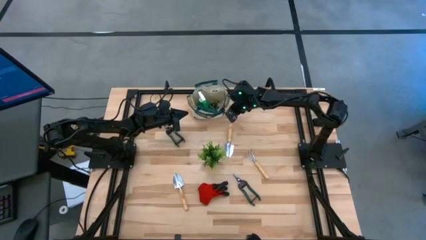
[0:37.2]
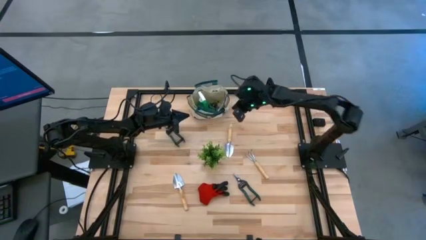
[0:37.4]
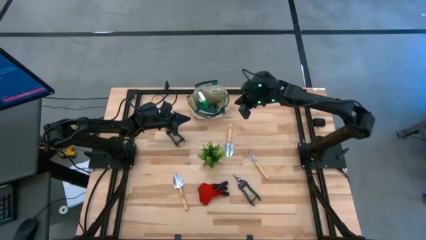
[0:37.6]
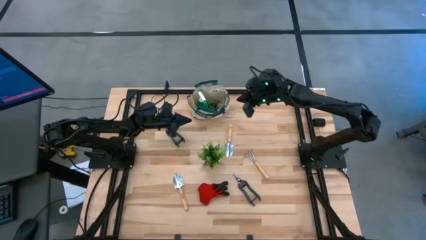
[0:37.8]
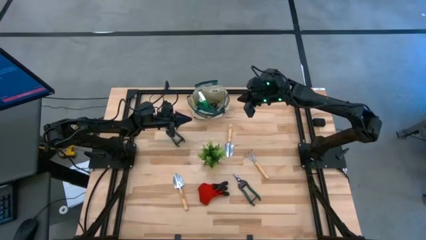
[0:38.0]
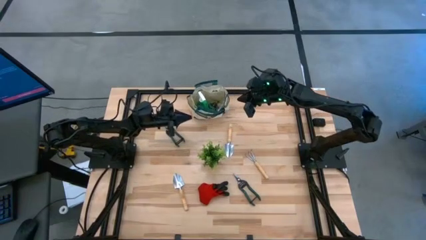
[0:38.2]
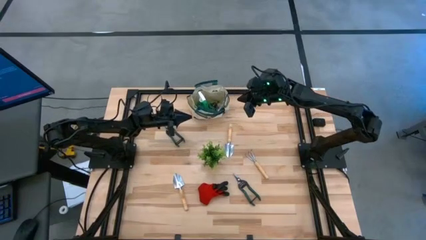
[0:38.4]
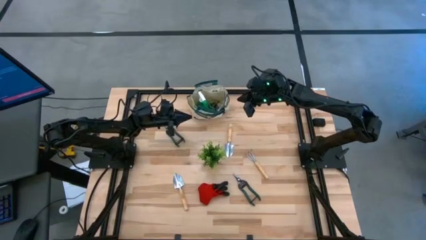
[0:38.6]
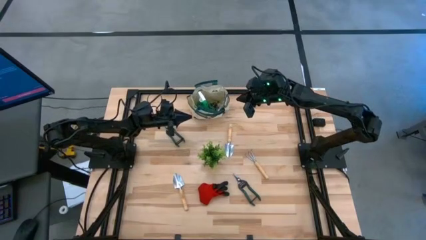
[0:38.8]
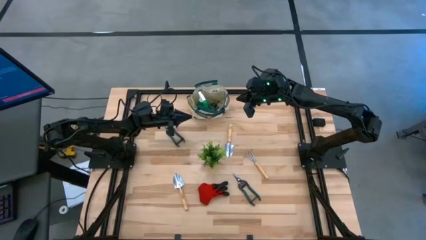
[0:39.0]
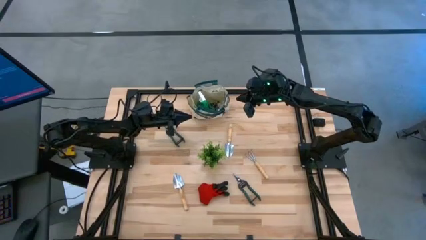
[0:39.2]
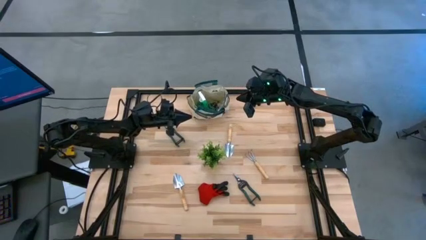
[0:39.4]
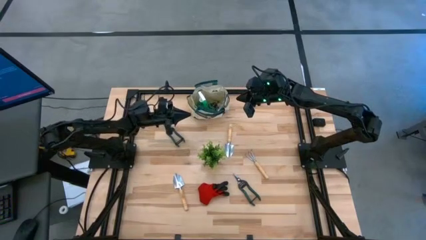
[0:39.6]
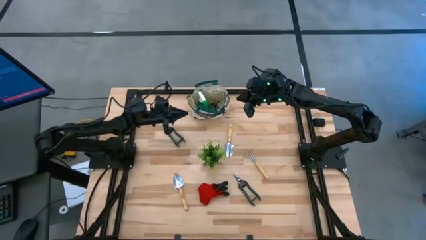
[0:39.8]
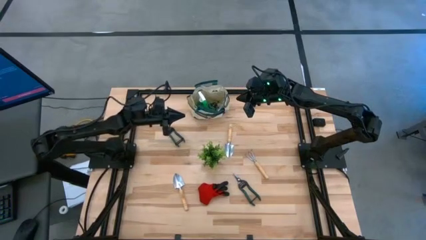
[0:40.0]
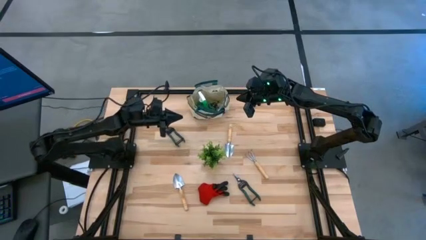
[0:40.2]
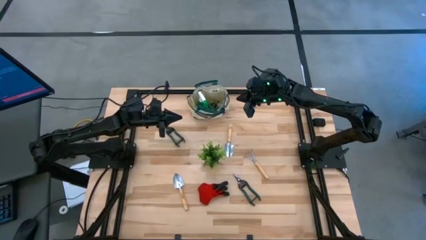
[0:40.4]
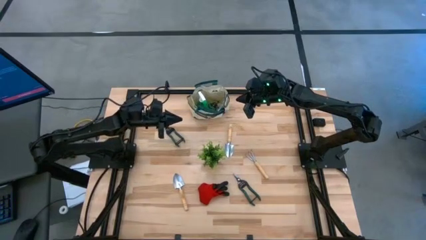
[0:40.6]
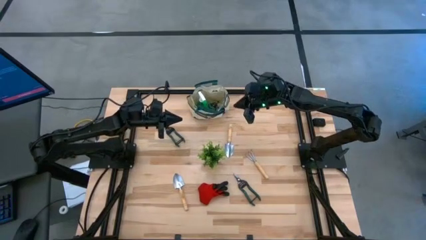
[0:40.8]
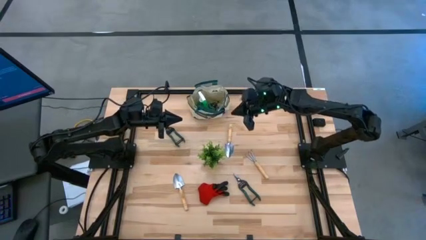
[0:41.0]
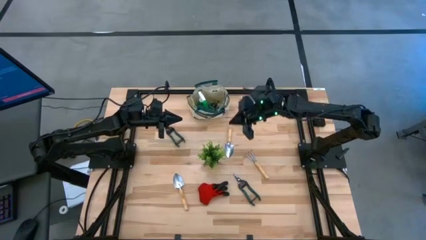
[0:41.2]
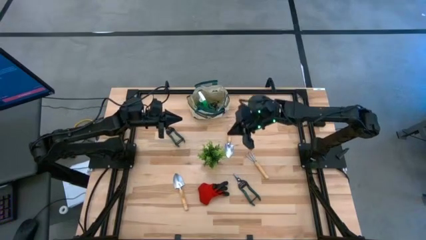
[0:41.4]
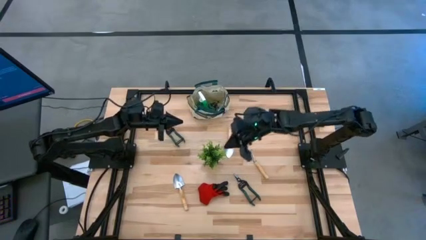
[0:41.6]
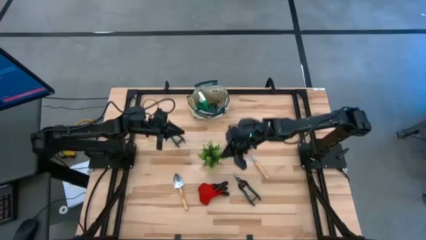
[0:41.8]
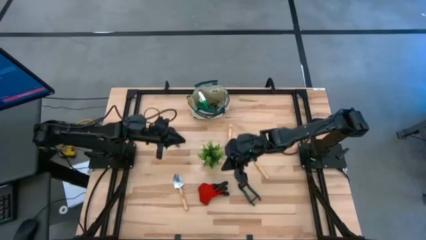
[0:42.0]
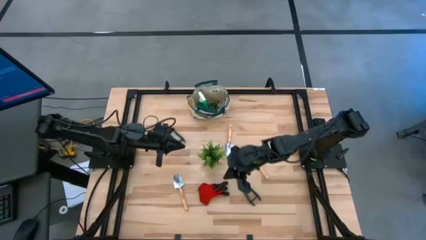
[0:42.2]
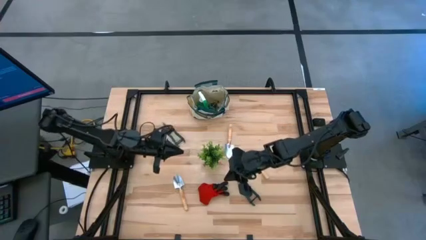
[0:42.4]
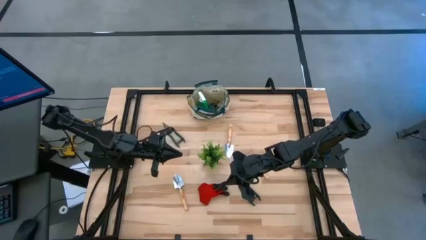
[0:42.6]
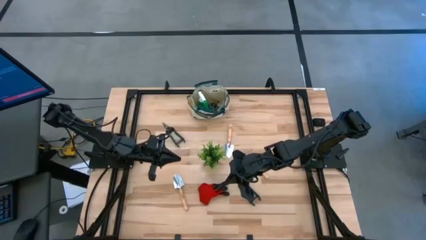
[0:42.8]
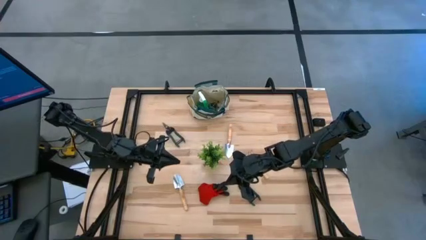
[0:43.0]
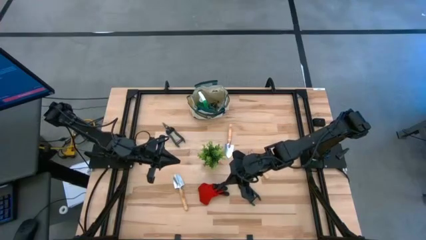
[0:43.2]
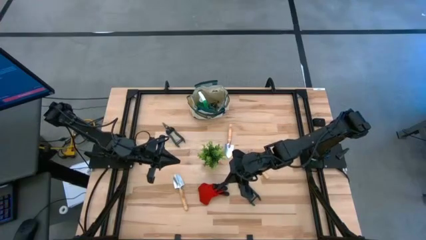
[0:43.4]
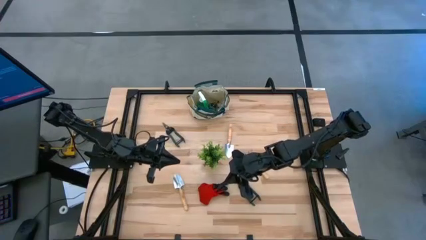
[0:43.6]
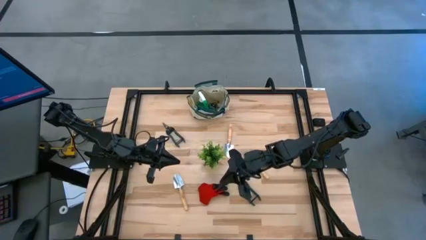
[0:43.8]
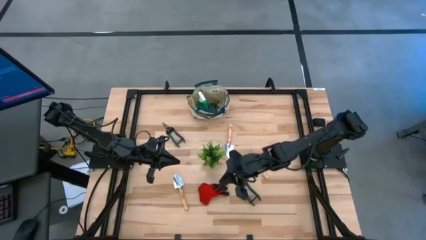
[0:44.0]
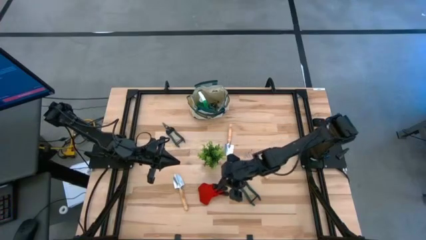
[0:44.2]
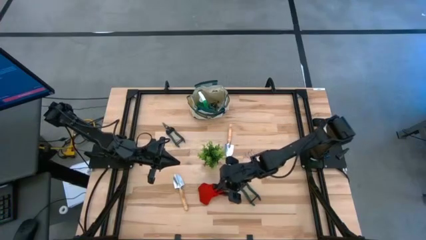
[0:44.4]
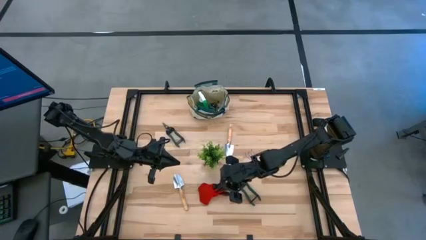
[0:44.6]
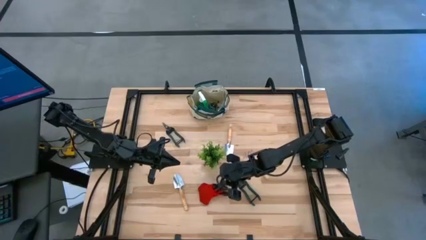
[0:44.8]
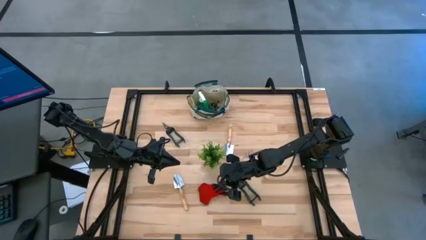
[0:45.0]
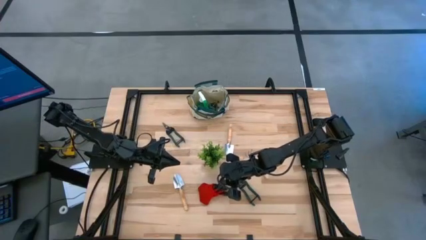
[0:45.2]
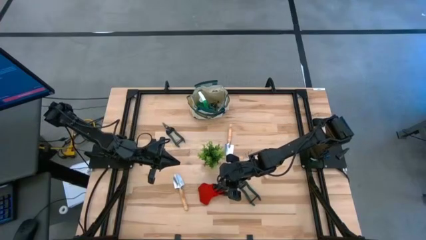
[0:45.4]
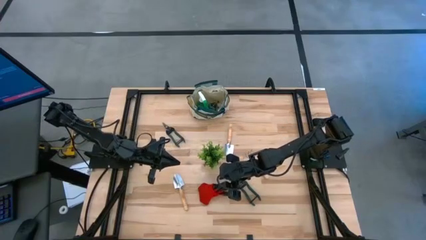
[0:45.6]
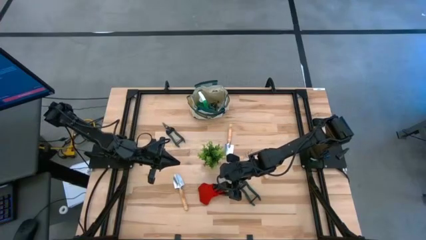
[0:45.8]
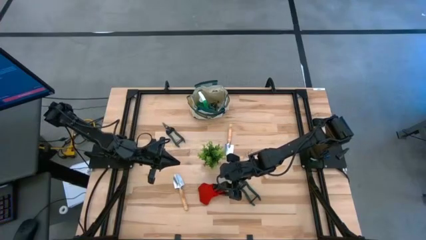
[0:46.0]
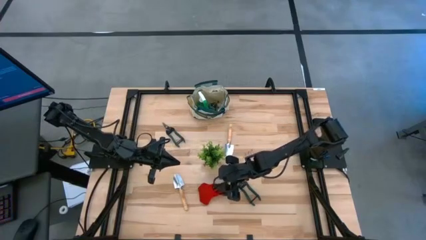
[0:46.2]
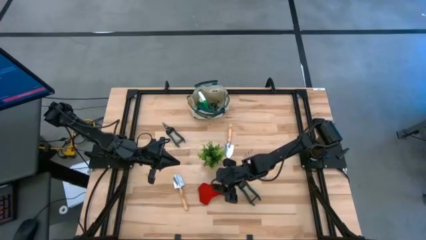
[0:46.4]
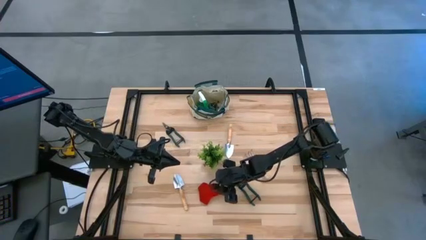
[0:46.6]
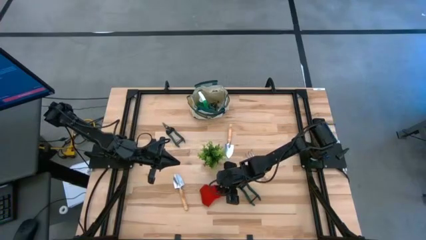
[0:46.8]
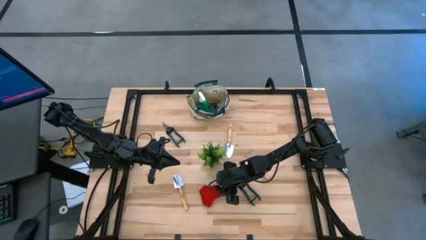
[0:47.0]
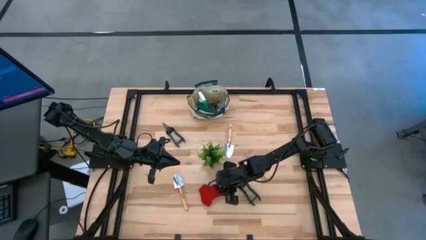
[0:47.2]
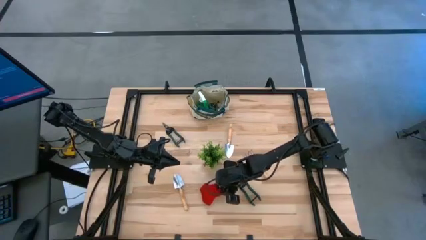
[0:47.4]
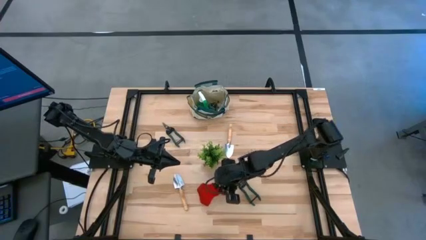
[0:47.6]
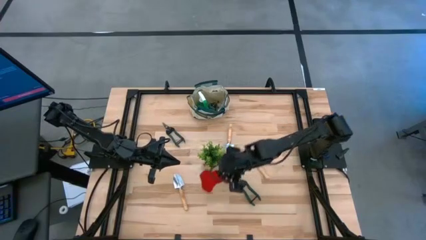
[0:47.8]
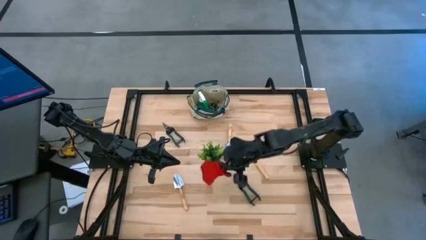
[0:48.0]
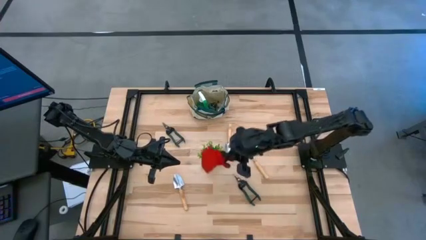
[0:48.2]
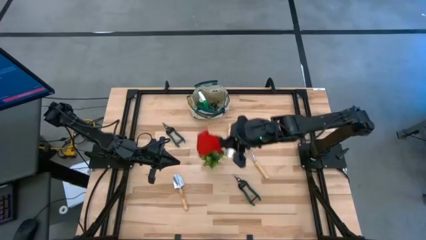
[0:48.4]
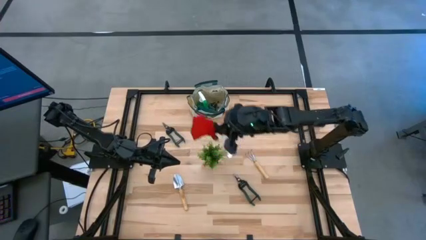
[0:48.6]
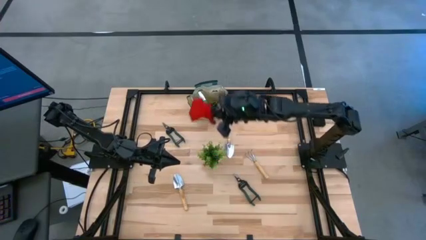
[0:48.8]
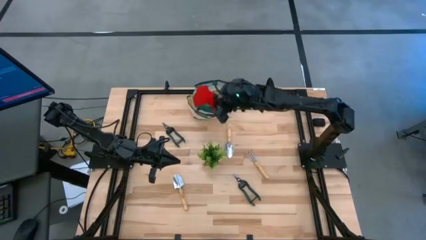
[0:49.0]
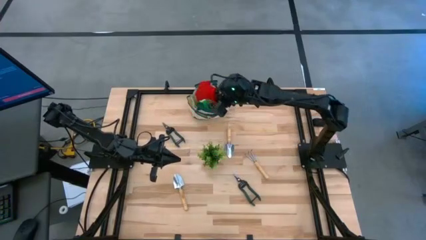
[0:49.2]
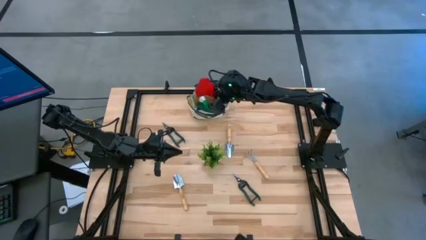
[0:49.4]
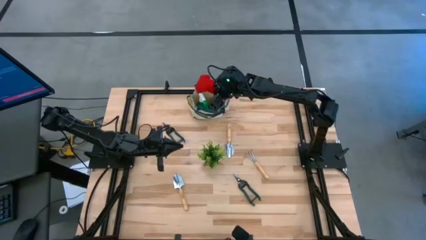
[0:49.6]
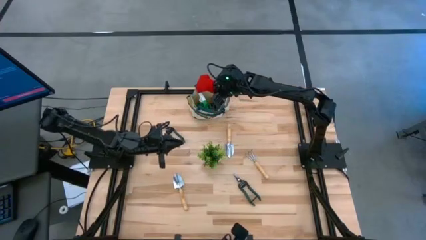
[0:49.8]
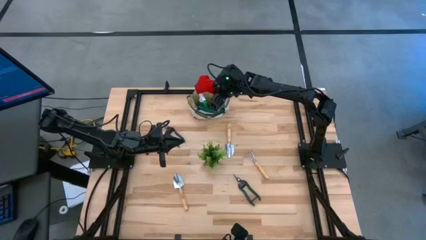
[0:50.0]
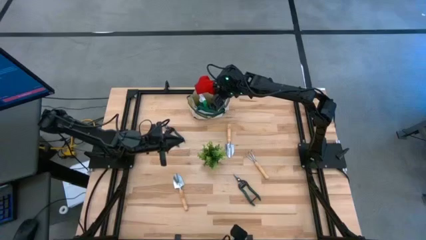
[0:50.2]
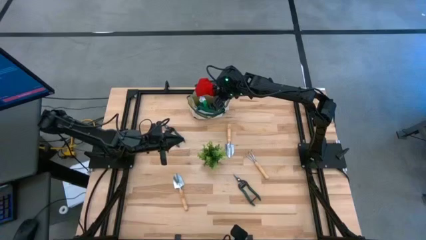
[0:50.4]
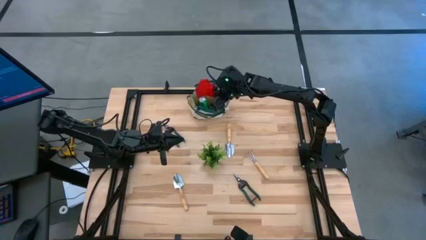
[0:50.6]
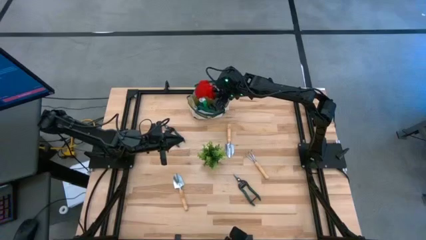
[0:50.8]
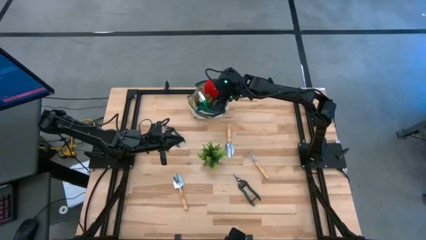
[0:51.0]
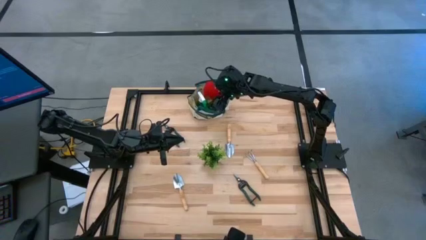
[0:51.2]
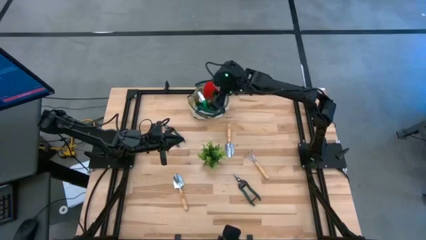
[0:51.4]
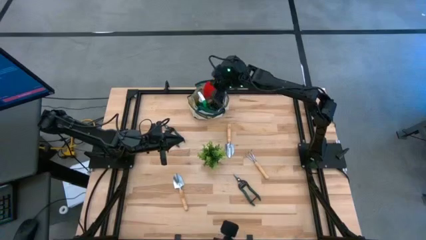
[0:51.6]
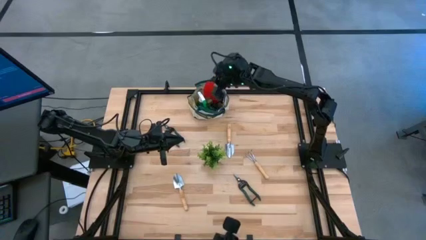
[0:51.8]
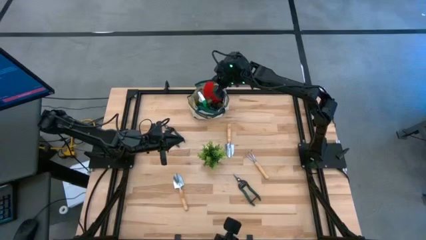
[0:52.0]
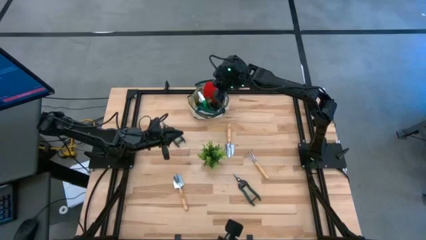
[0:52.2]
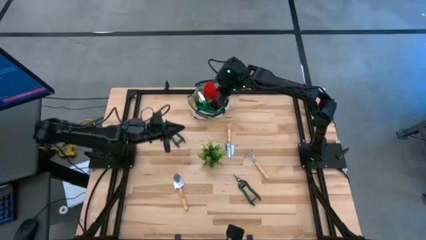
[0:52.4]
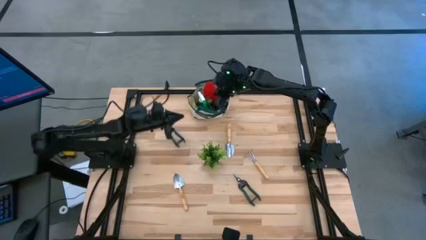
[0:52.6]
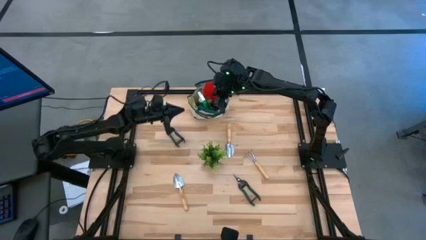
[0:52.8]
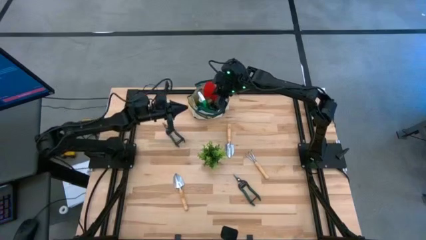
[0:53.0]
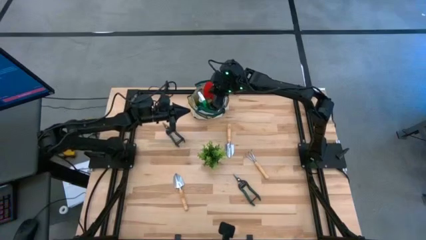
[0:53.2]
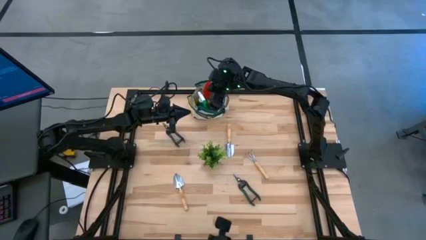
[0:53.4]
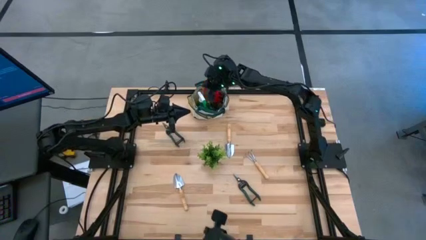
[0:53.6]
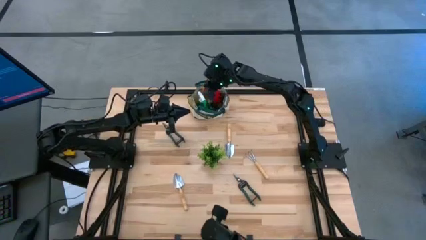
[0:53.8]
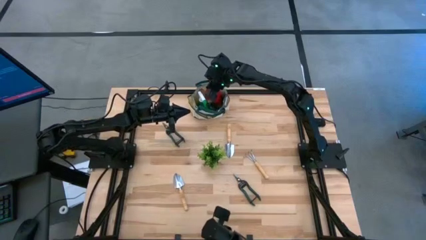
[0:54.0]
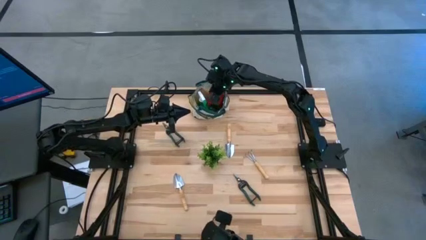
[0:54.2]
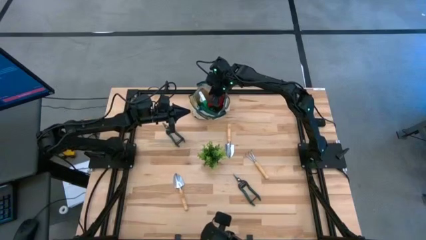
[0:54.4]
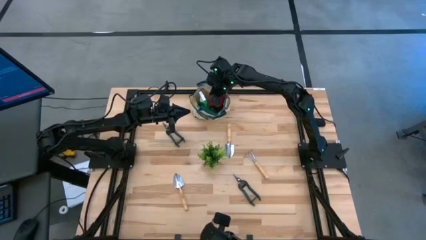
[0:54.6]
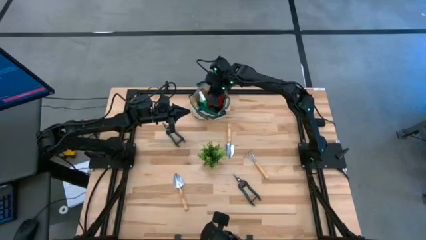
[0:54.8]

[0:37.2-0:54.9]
Task: Pick & Place Garden tools in Gardening bag
Put the red gloves into the brown gardening bag
